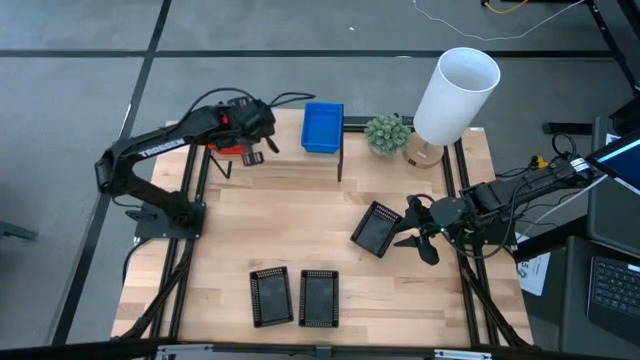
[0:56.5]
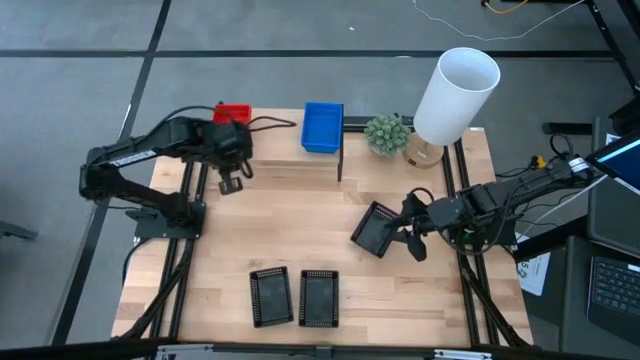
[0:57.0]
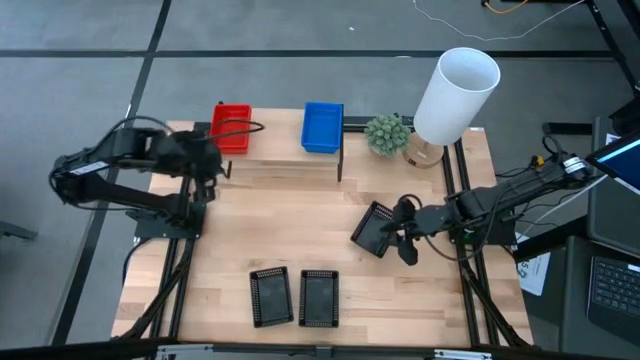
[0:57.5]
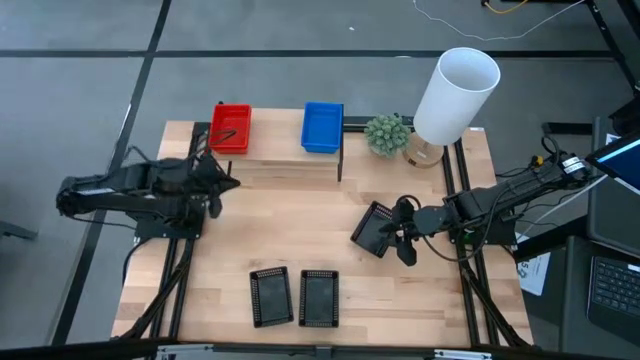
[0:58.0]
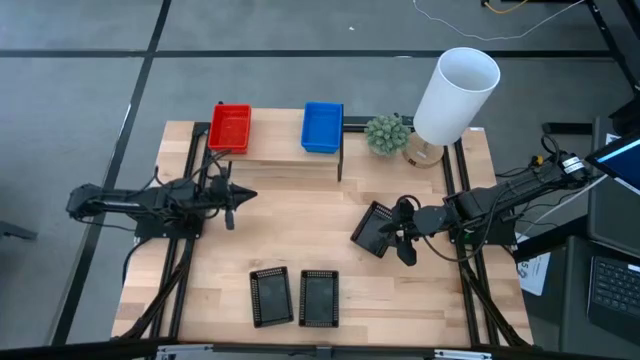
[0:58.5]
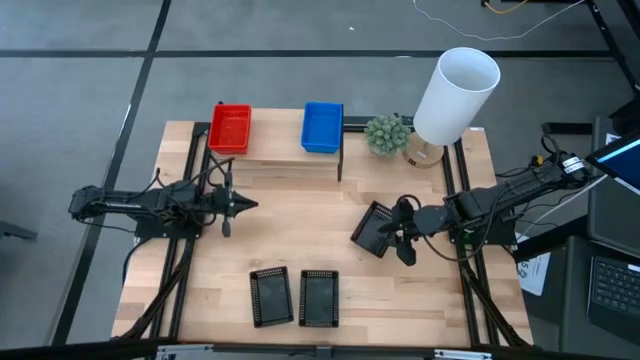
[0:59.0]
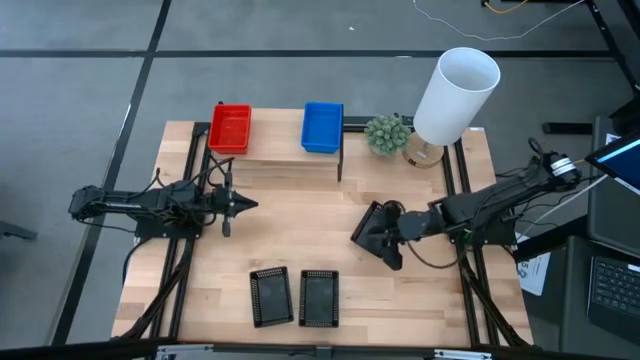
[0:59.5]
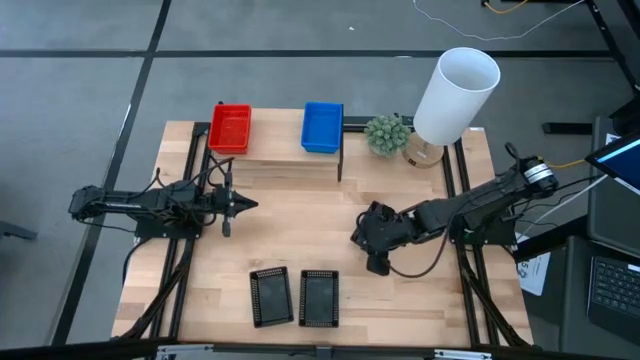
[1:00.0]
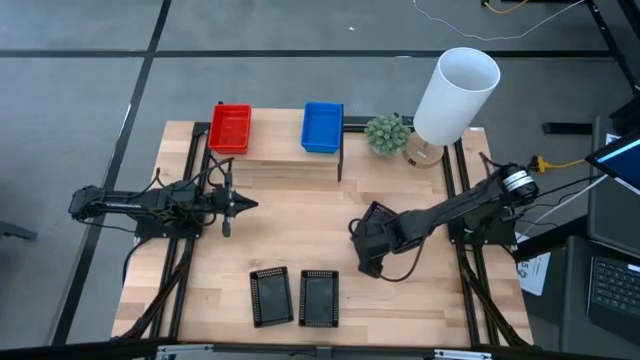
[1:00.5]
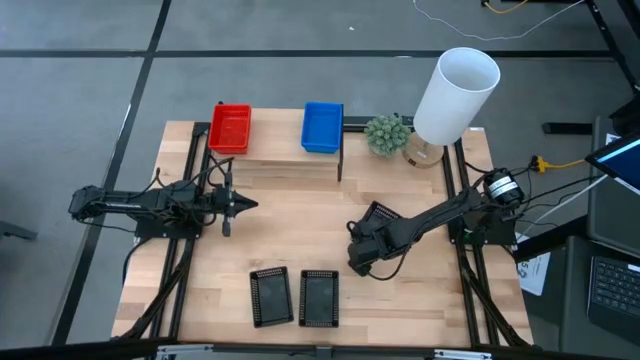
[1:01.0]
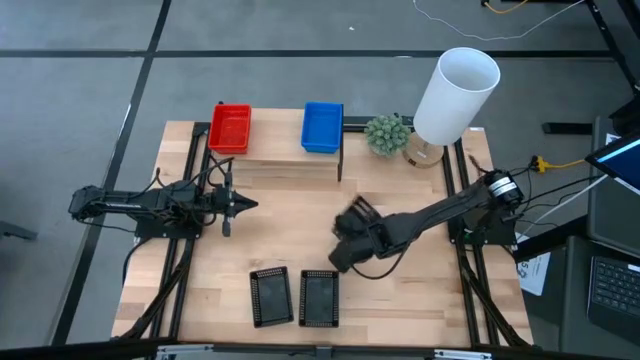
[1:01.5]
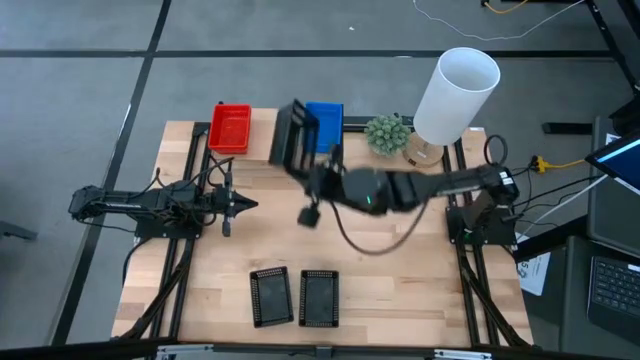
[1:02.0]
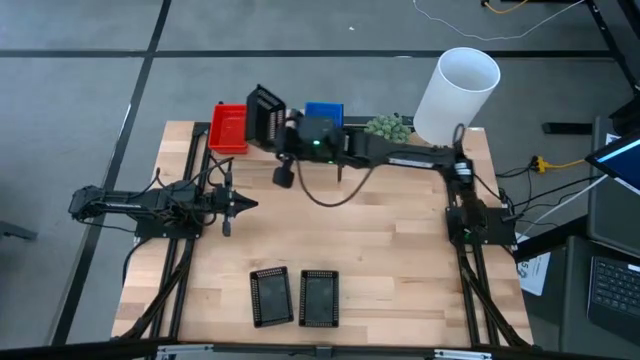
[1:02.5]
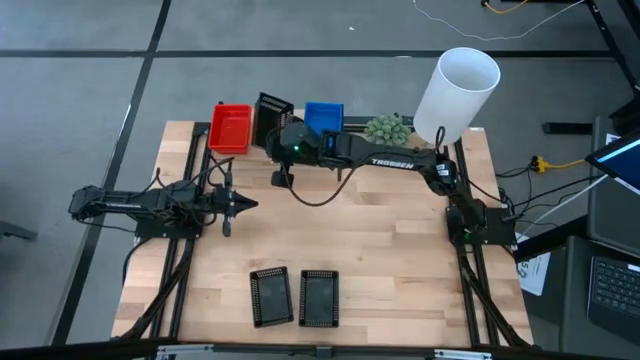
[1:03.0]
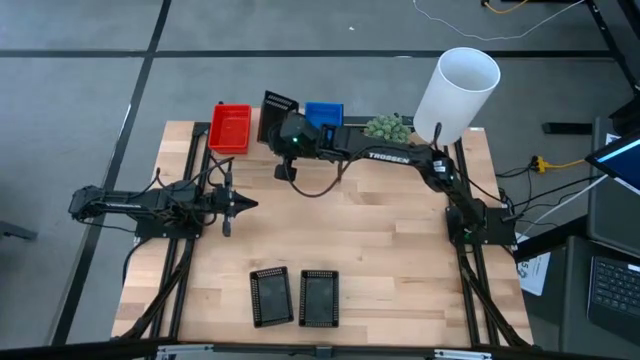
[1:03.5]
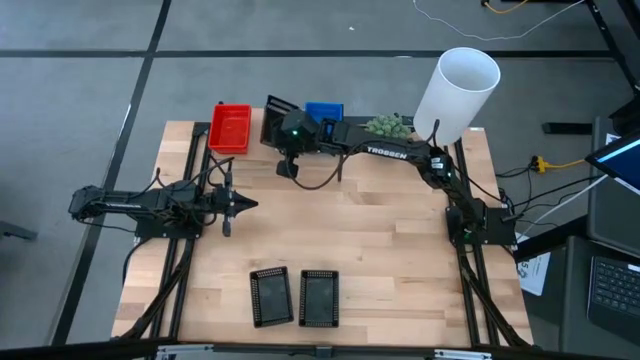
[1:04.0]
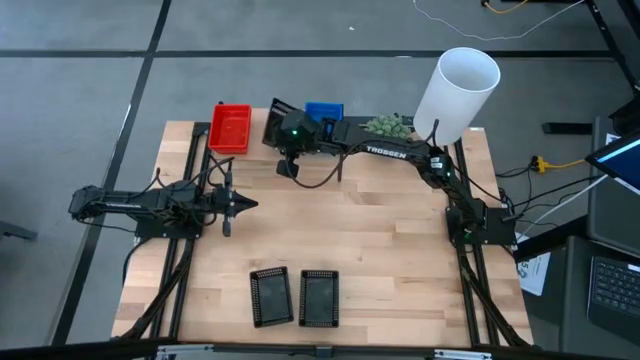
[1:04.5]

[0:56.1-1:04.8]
Task: Stack baskets on shelf by color
Put the right black bin on the shelf on the shelf

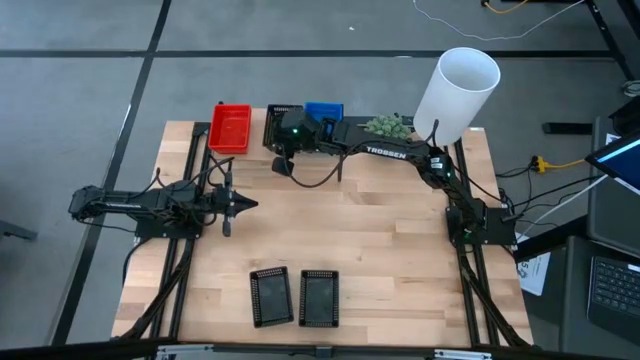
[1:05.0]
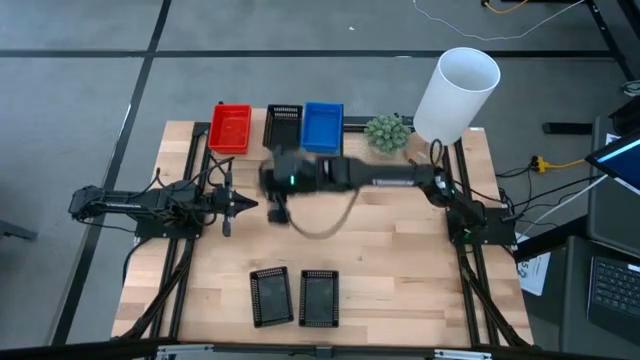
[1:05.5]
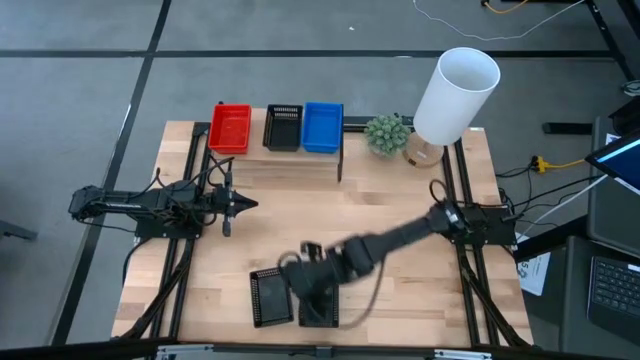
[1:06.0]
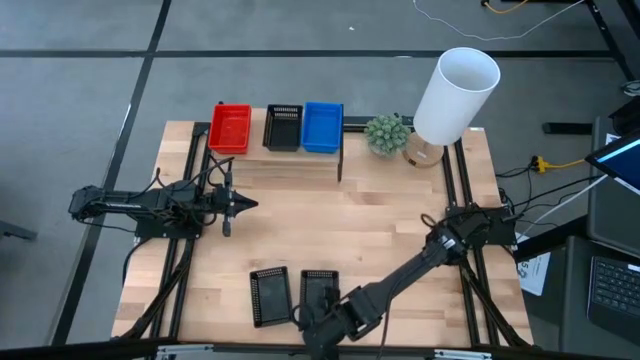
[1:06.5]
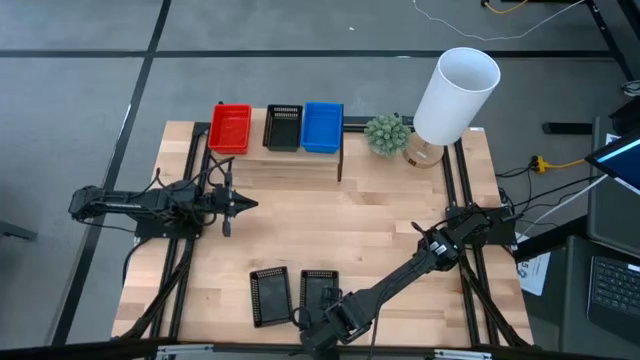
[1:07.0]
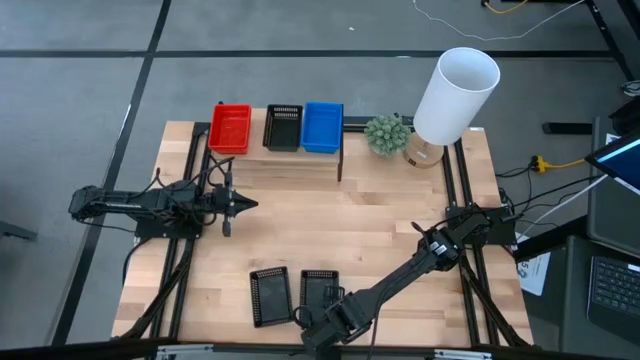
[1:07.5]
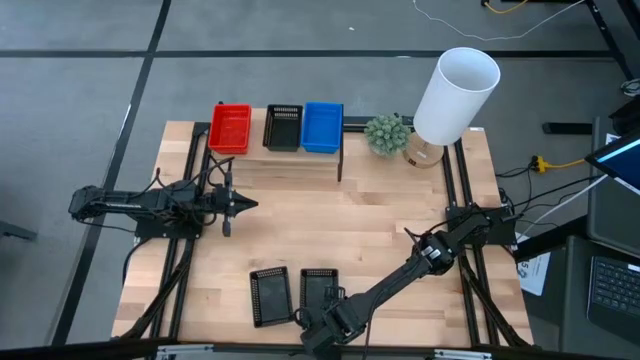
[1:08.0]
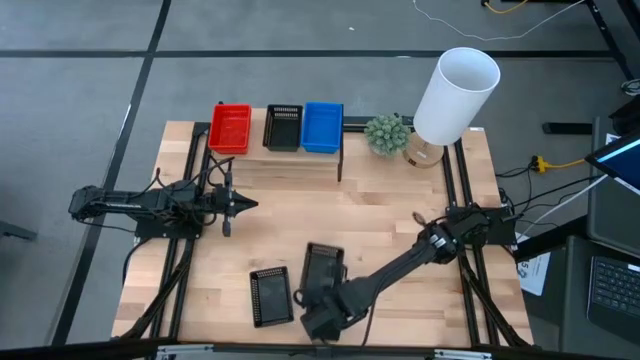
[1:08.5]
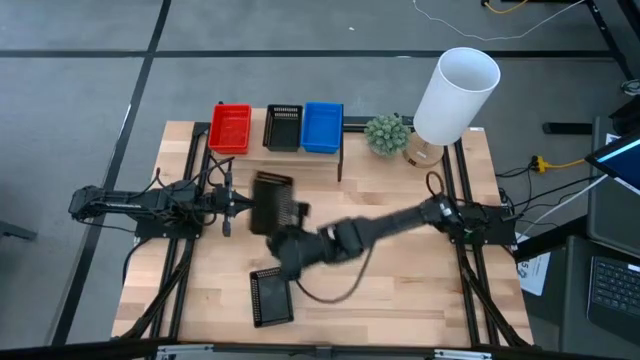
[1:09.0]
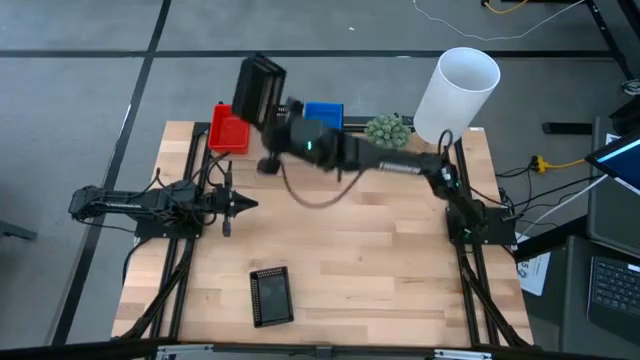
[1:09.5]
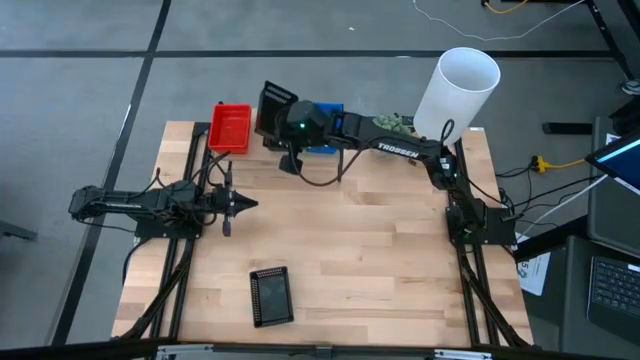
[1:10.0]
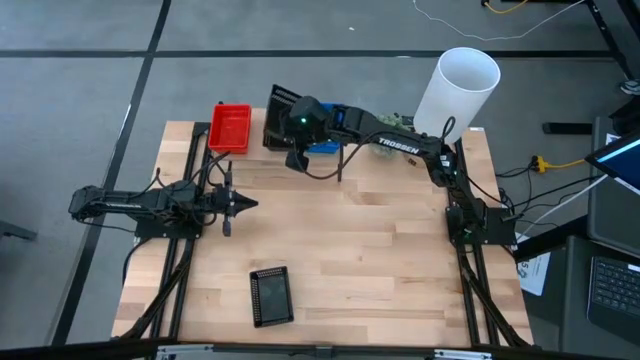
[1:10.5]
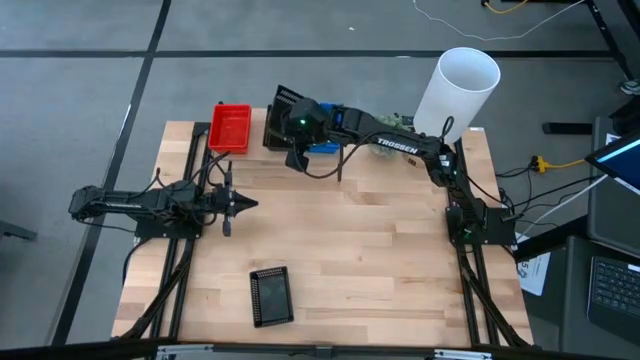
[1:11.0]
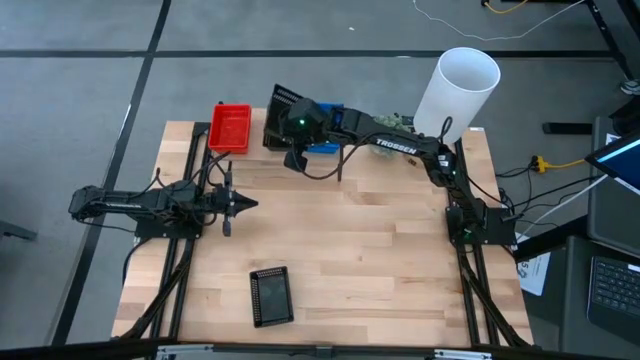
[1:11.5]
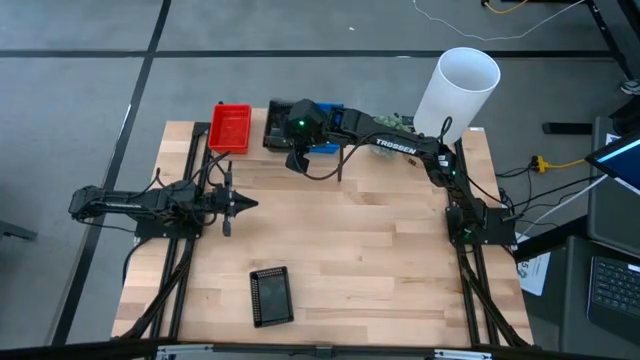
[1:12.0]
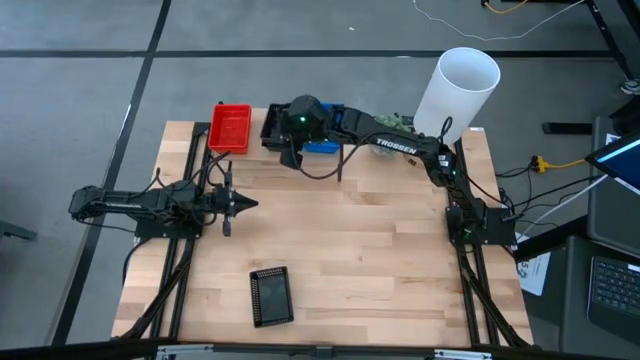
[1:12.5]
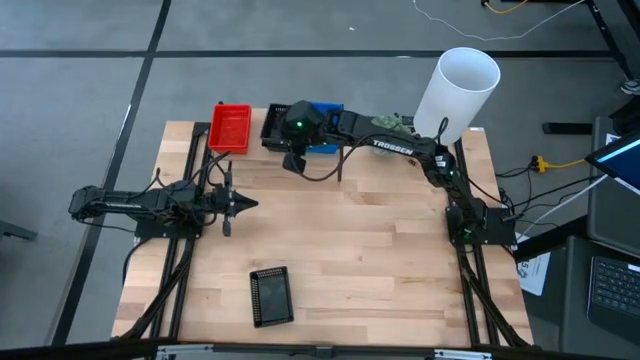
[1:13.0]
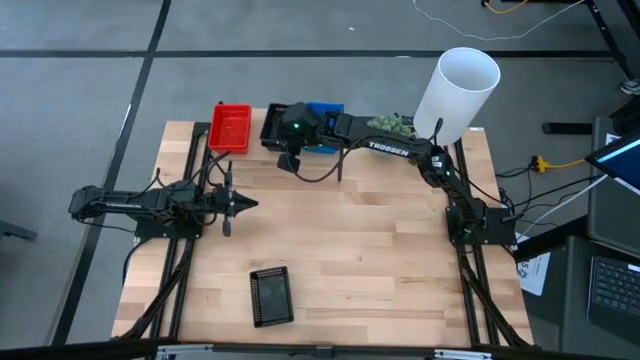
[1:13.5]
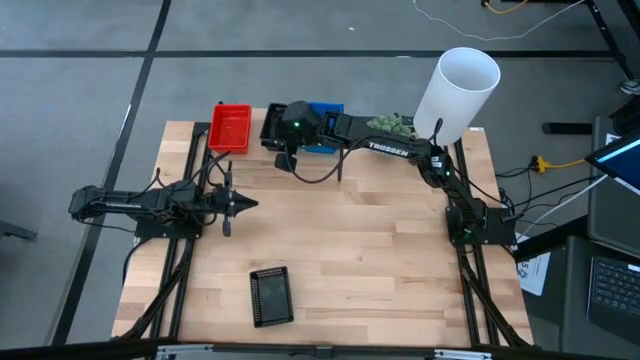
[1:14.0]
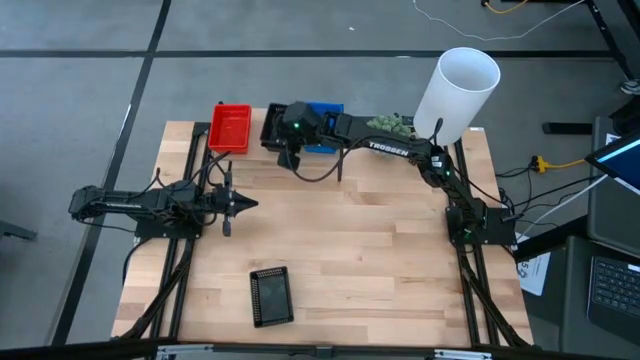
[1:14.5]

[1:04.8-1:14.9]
Stack the right black bin on top of the black bin on the shelf

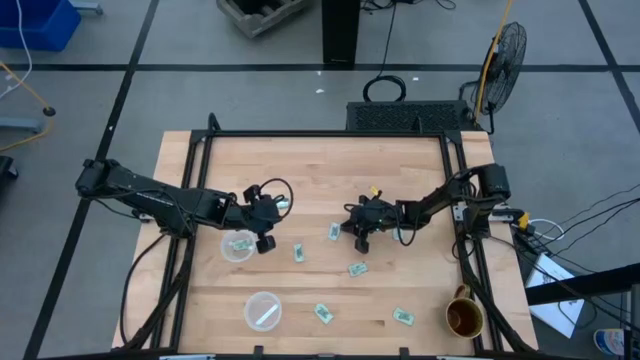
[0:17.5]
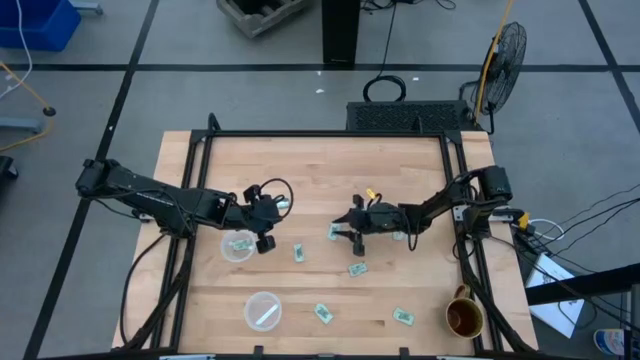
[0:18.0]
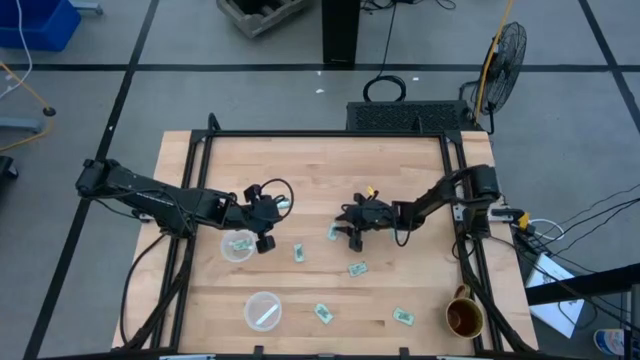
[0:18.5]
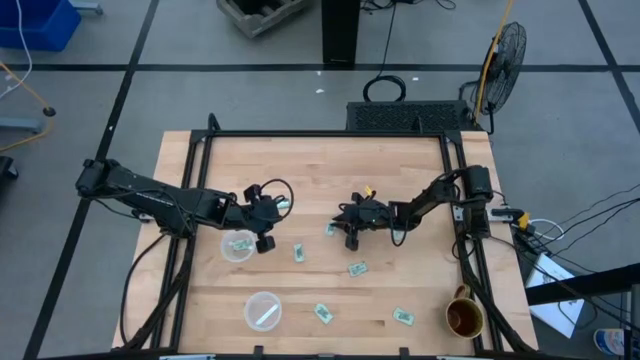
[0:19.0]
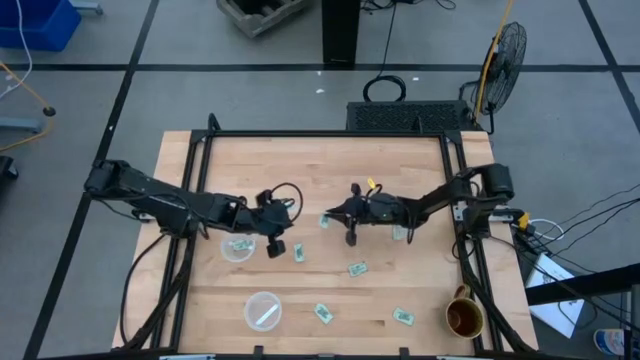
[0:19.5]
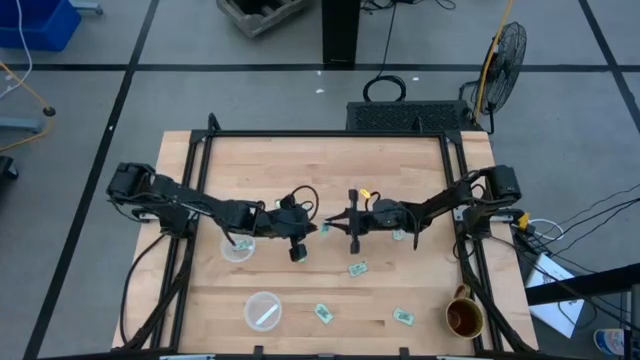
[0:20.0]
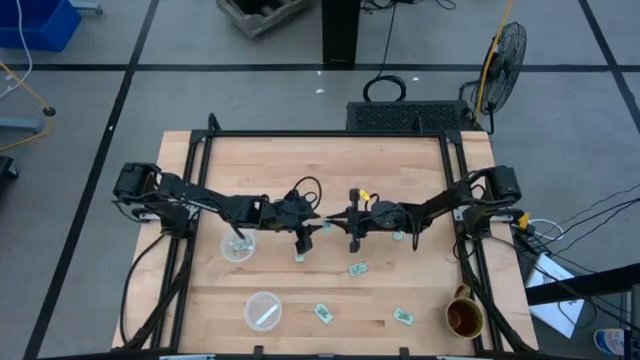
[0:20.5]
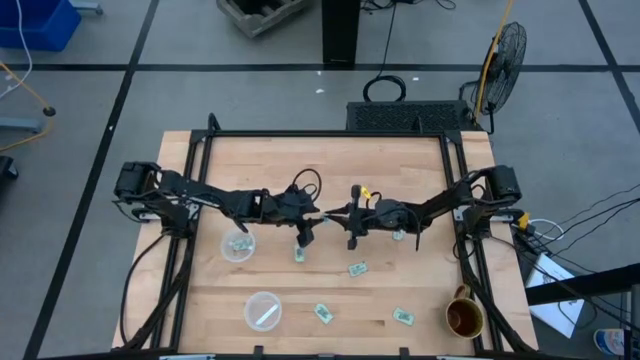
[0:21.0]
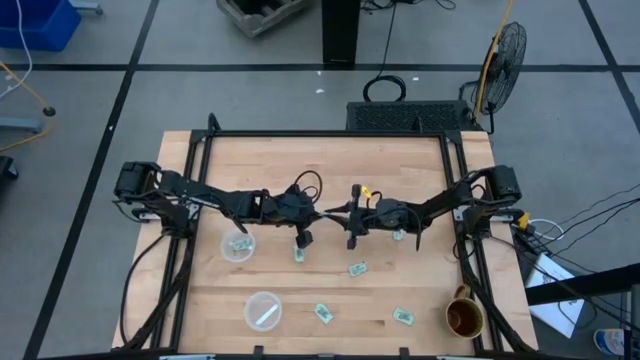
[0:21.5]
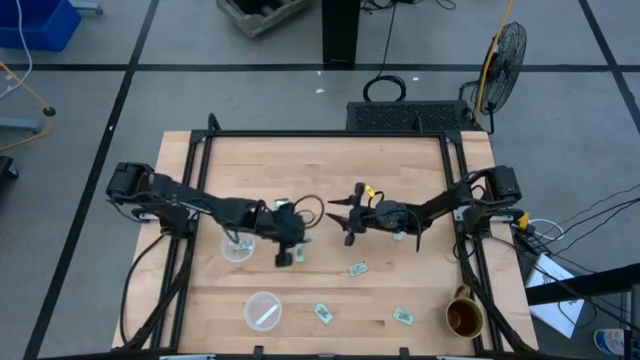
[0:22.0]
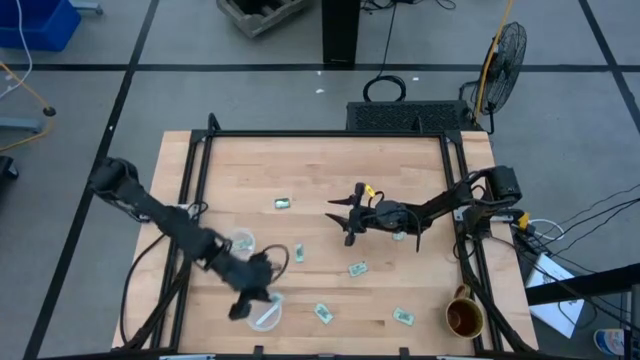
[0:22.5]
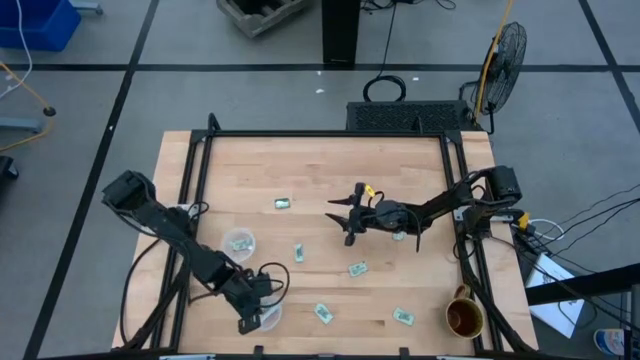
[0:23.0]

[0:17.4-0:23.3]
Task: Pick and place Stevia / Truvia into bins
Put the stevia packet into the bottom container
